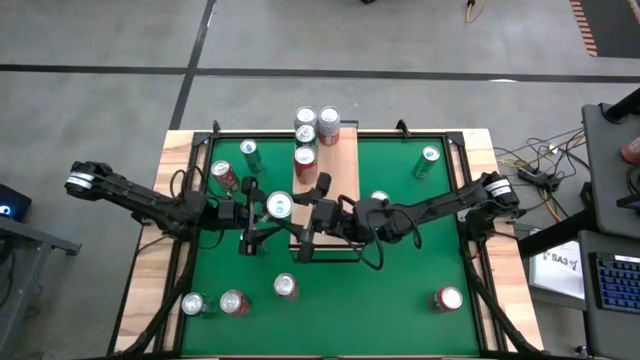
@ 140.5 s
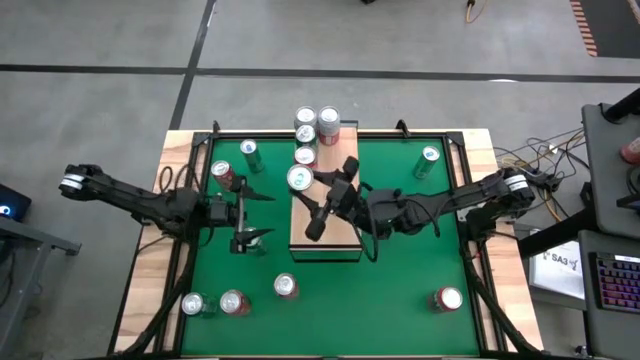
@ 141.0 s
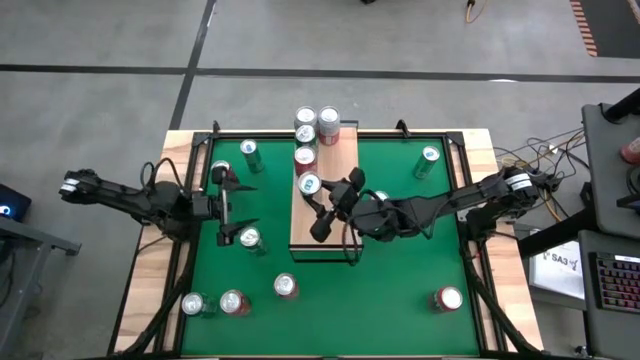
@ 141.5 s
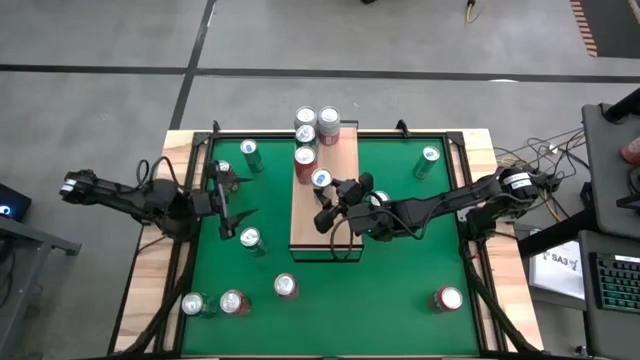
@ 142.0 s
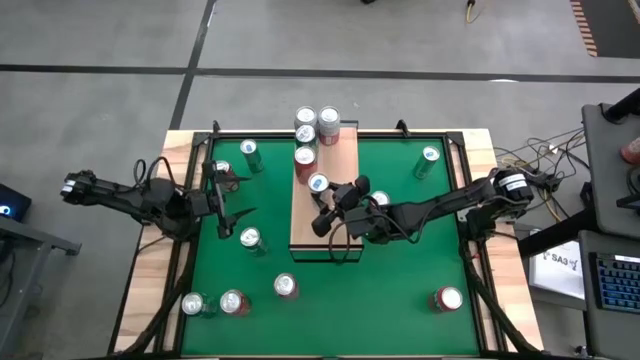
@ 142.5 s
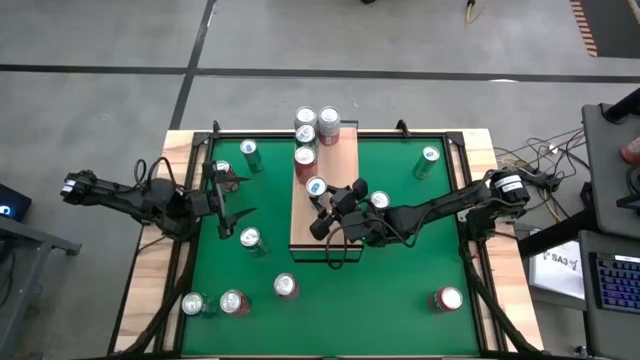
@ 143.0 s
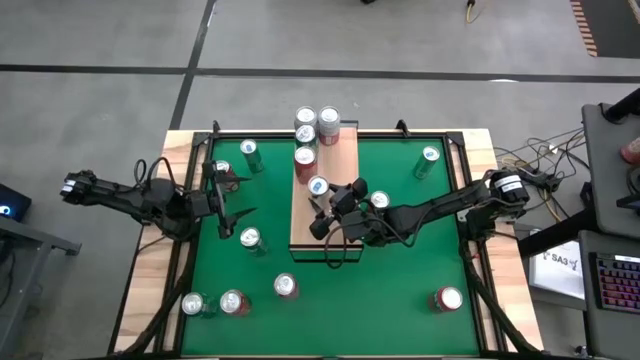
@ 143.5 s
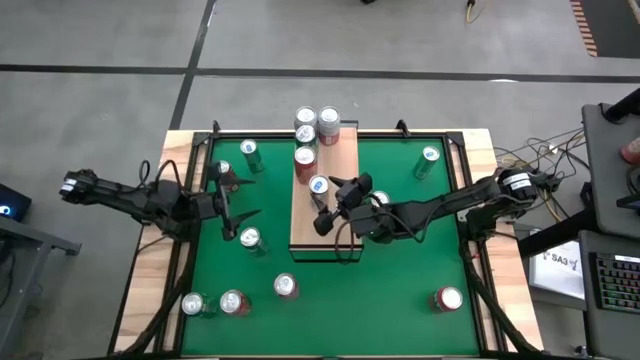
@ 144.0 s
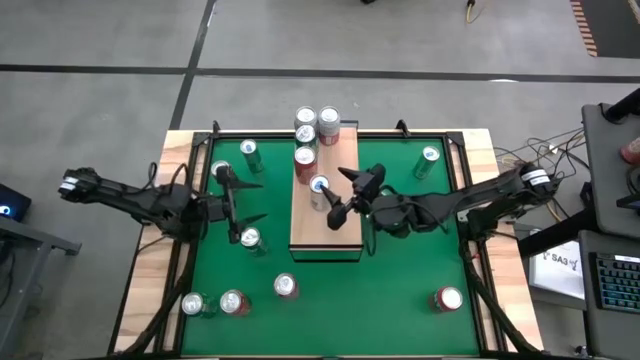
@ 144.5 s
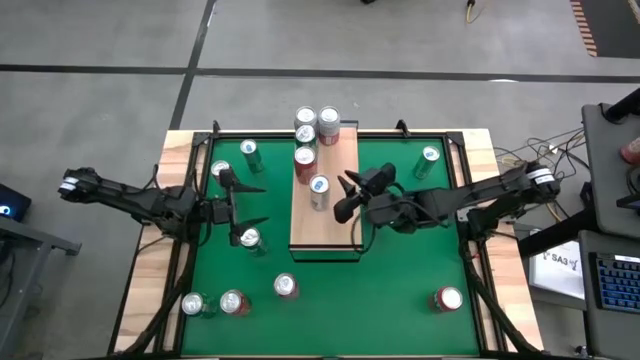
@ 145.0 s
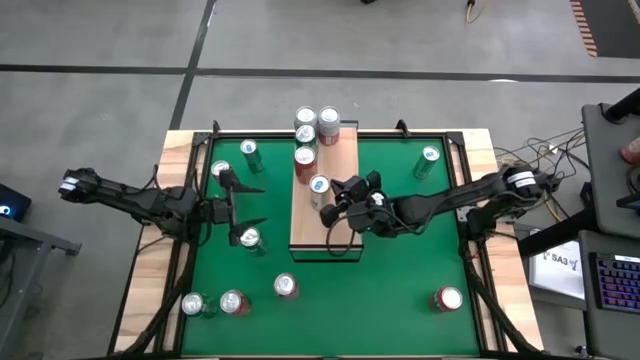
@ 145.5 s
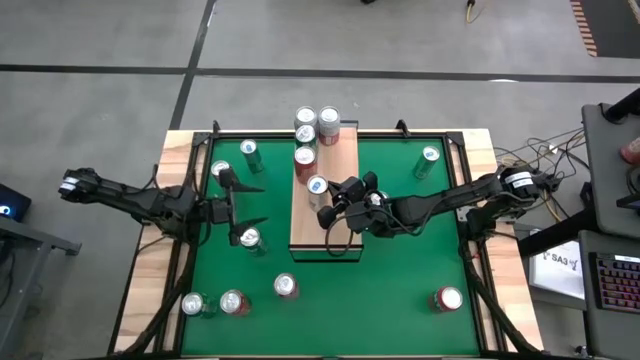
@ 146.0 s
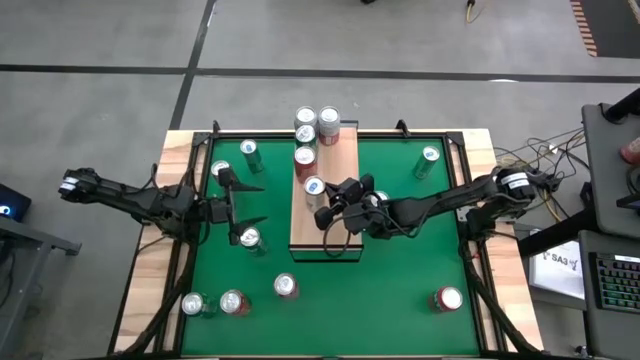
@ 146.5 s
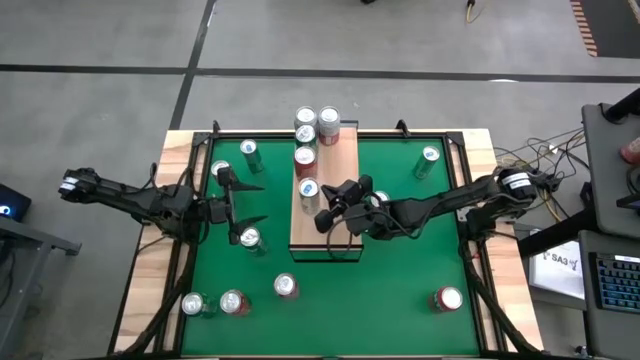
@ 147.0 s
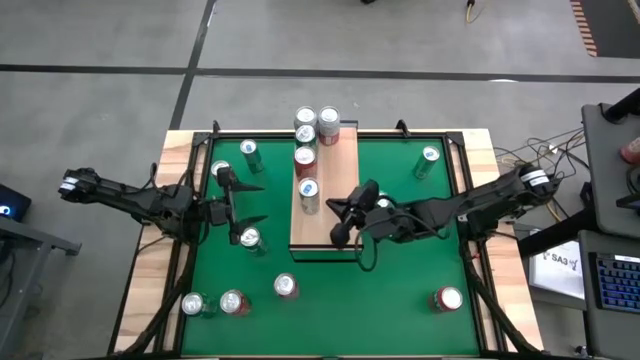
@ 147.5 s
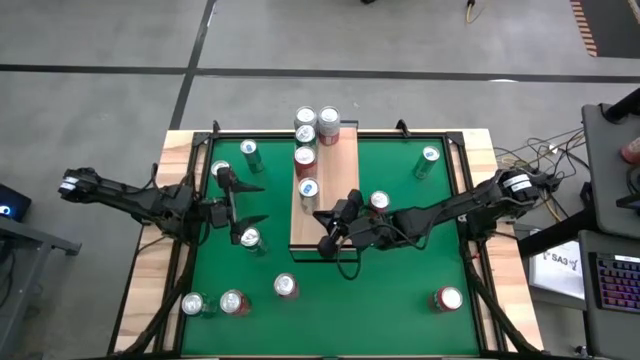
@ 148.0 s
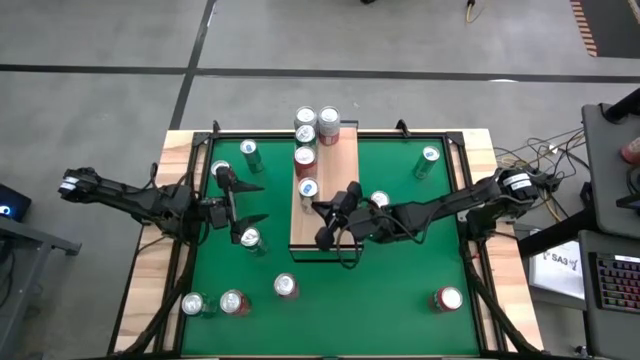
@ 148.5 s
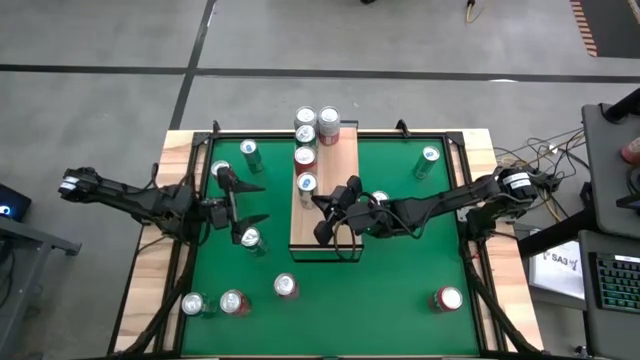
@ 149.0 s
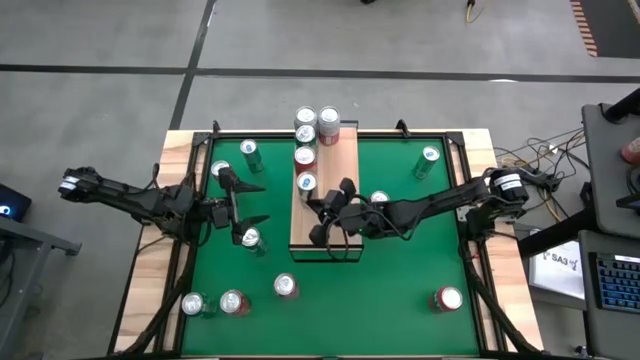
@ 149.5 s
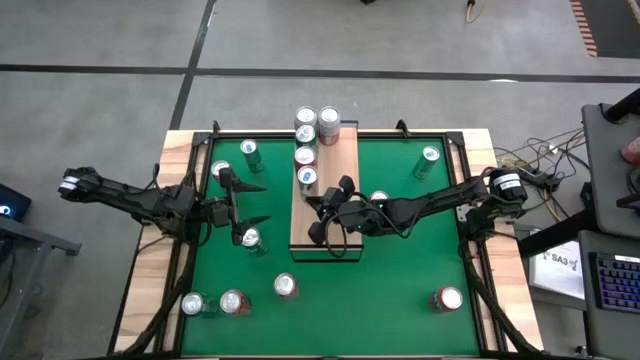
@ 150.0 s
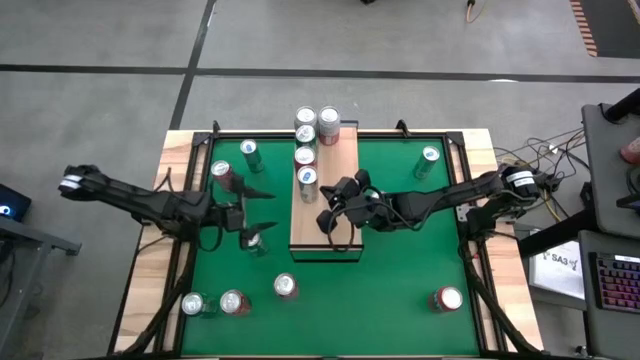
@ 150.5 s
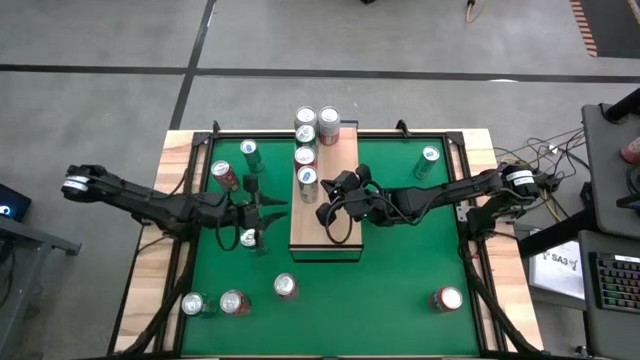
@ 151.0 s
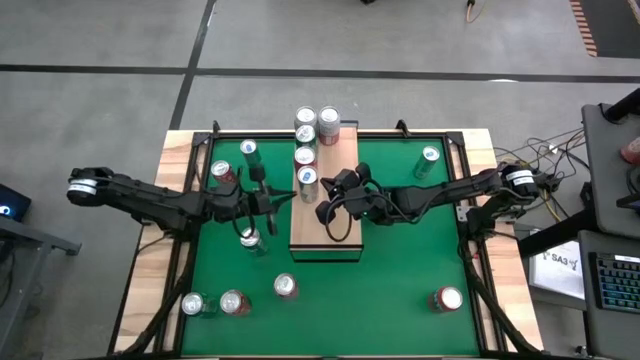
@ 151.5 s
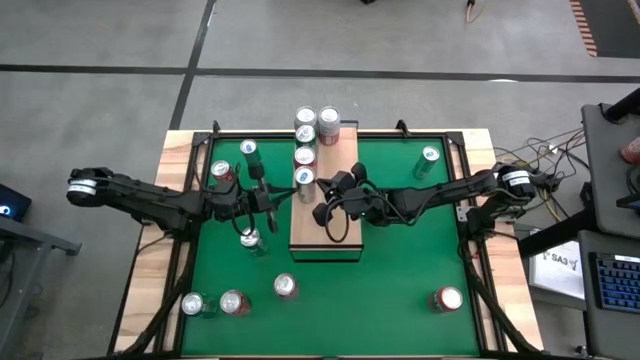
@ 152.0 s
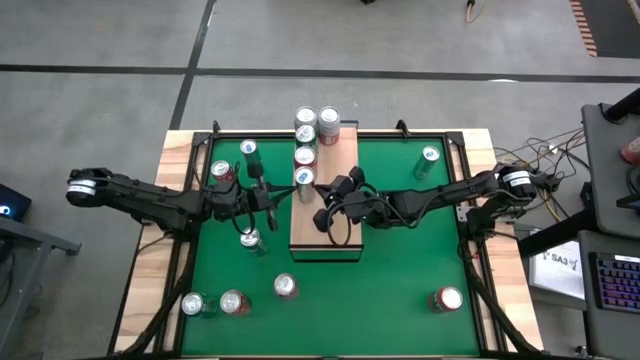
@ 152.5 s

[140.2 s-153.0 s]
Task: Place canned beverage on shelf
Put the blue can on the shelf

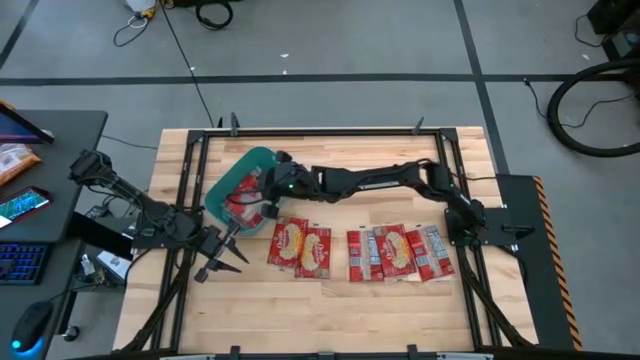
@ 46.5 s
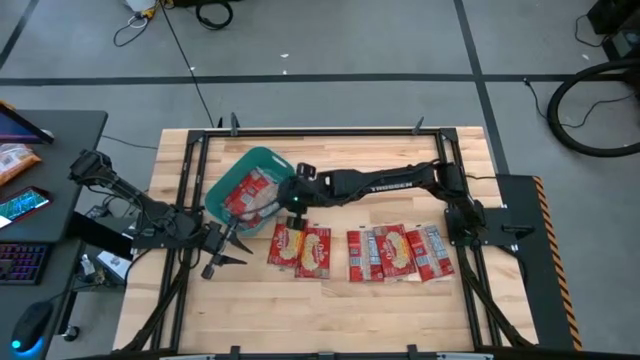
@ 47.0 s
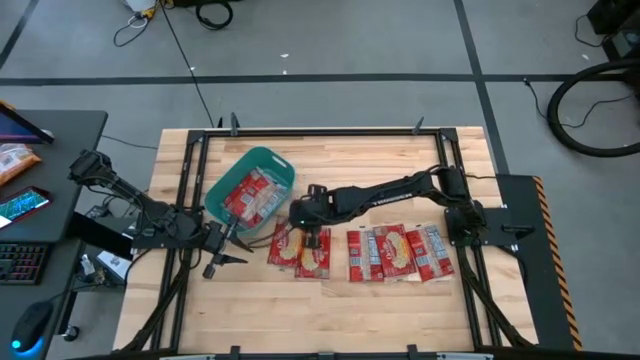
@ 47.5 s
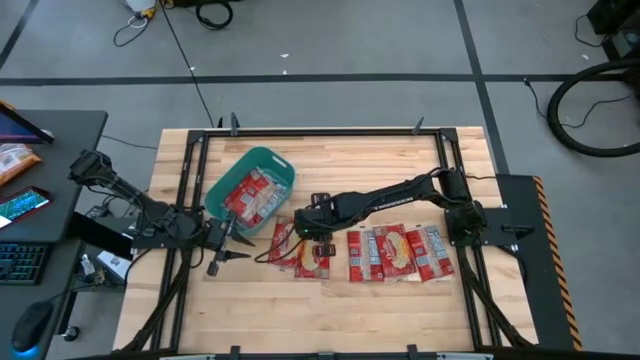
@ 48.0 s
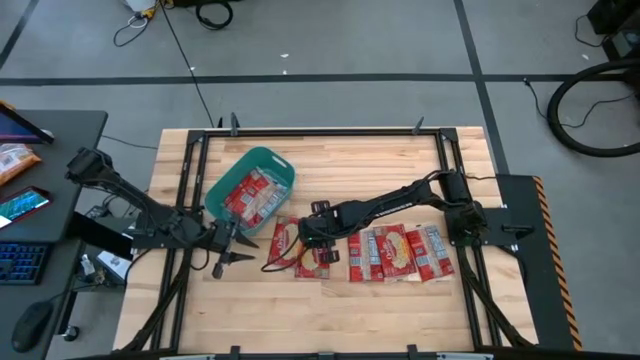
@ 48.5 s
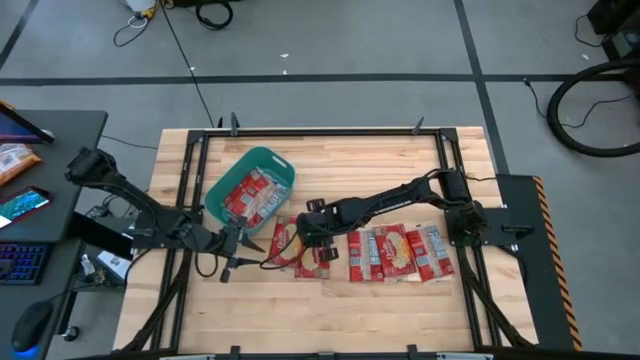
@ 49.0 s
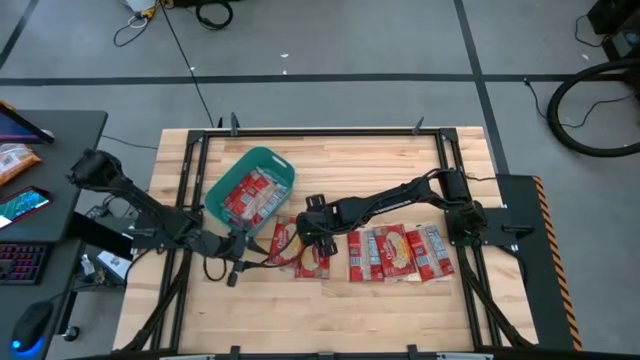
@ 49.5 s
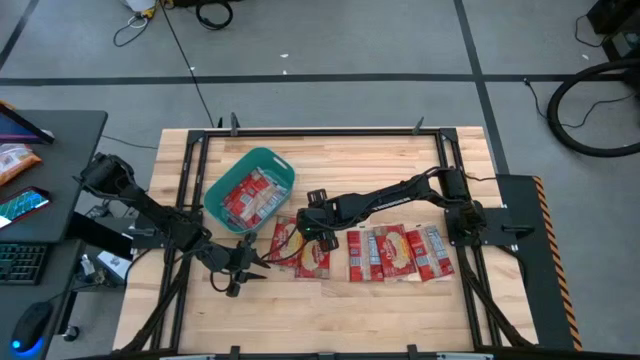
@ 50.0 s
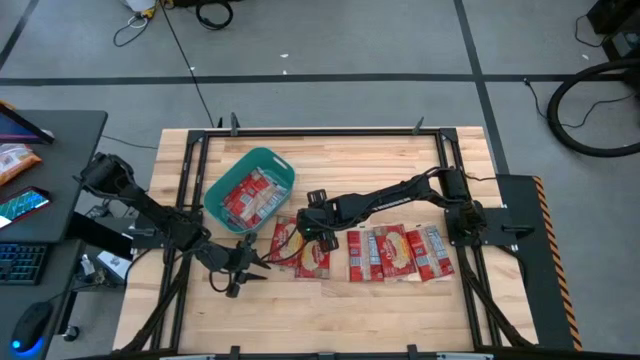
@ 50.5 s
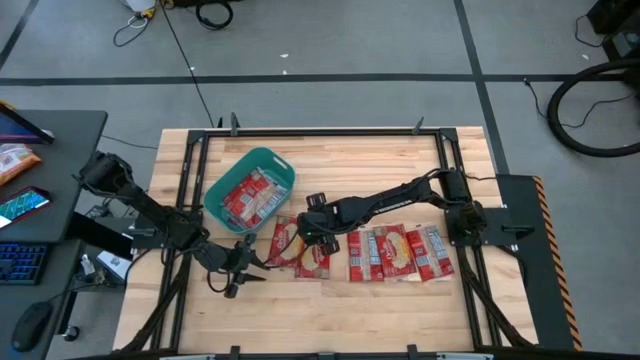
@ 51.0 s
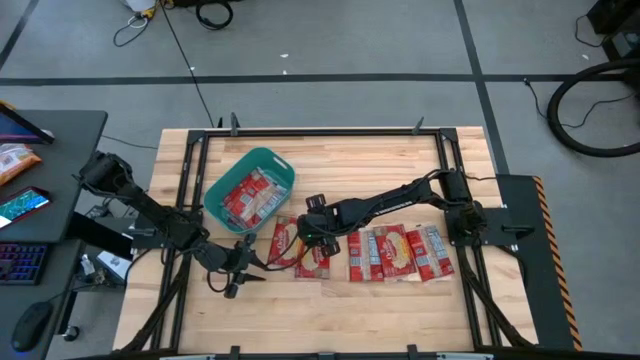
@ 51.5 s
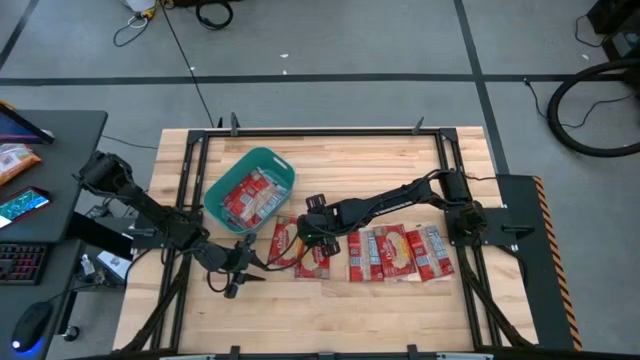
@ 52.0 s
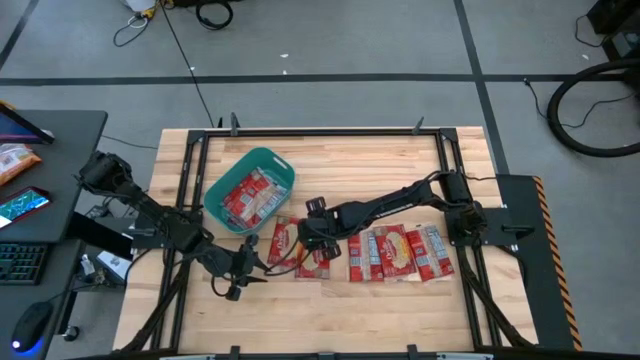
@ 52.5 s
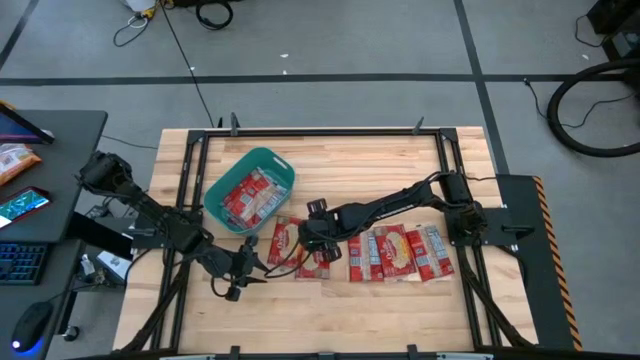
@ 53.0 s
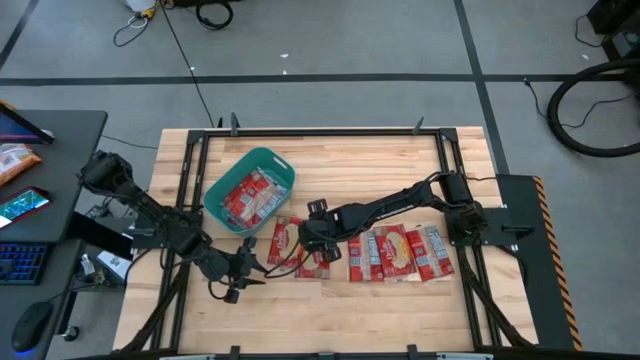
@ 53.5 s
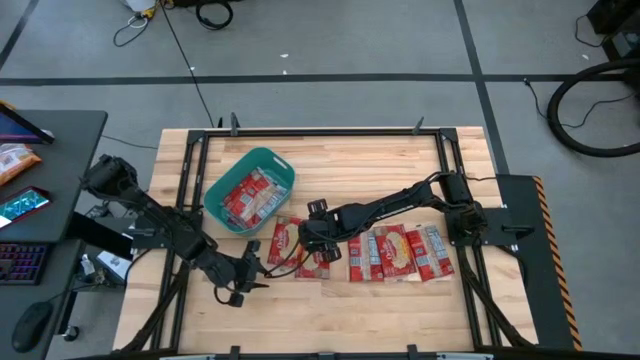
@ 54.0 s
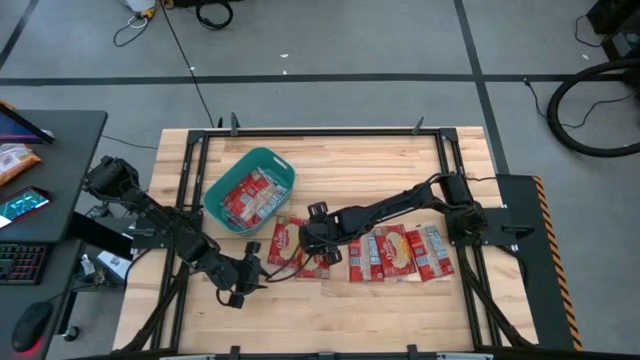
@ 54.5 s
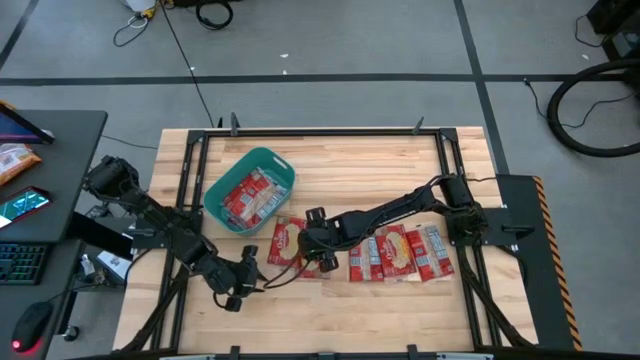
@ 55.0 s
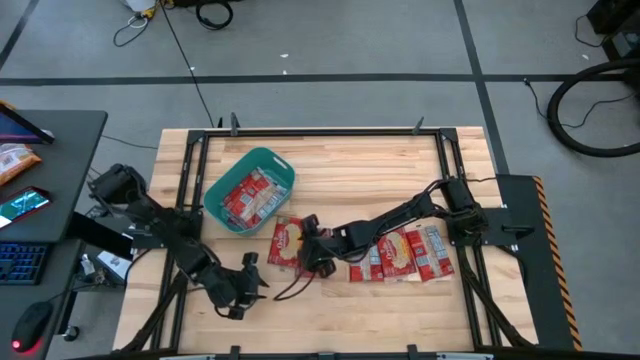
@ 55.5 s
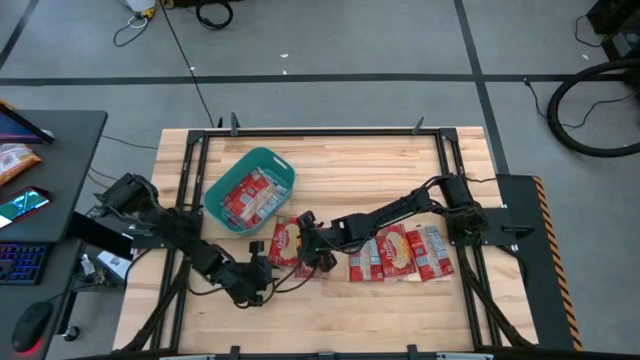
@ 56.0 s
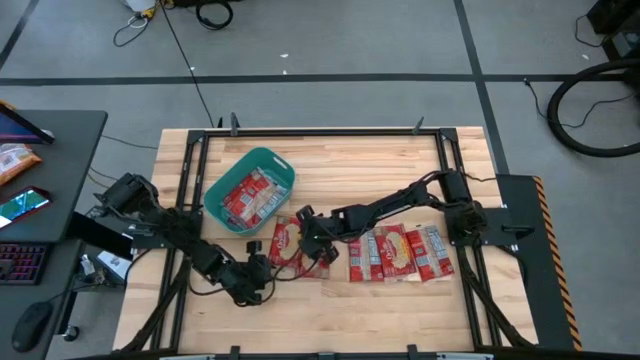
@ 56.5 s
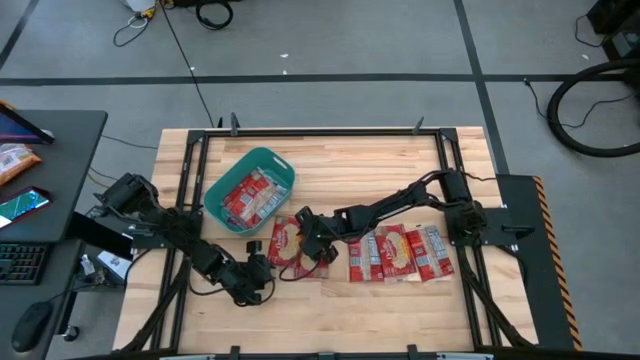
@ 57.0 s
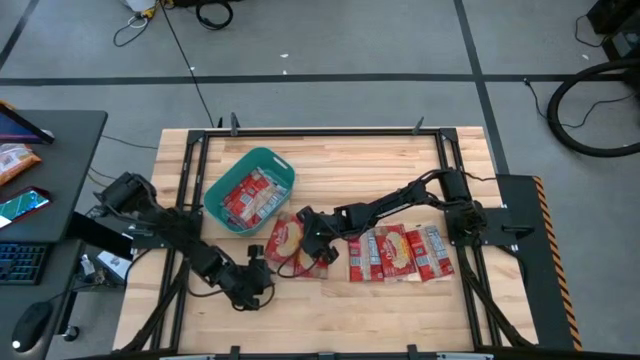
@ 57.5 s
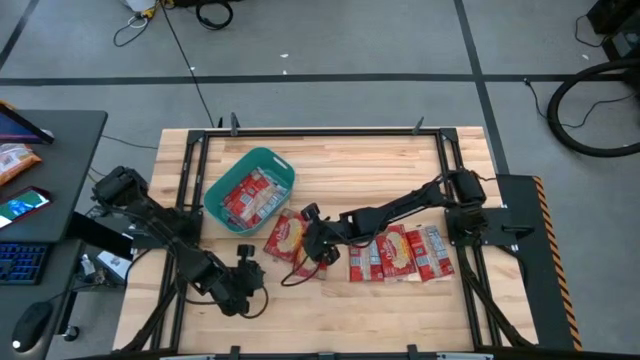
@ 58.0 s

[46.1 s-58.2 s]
Task: Sort popcorn bags into baskets
Put the red popcorn bag into the green bin
